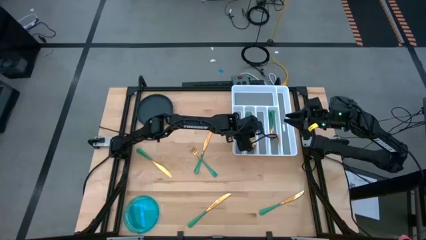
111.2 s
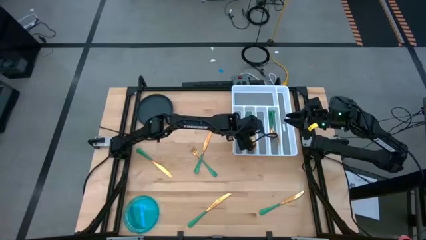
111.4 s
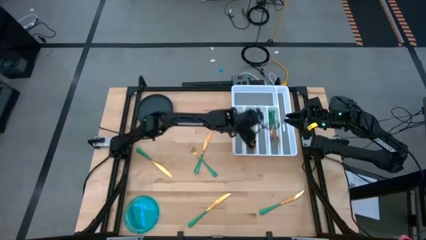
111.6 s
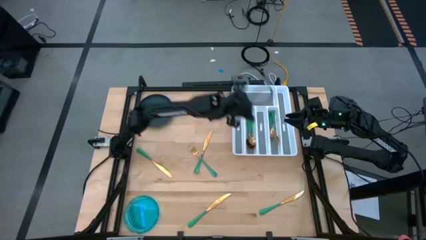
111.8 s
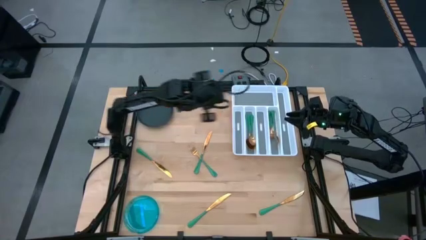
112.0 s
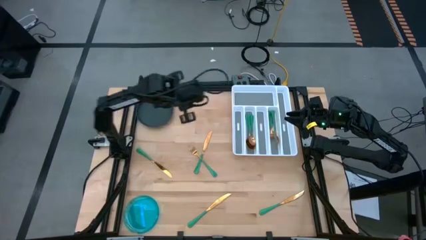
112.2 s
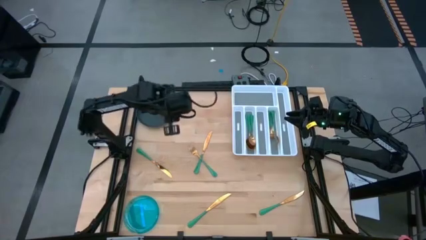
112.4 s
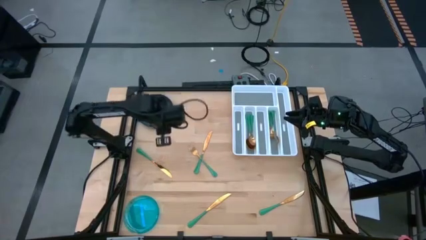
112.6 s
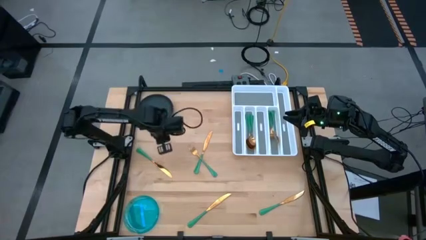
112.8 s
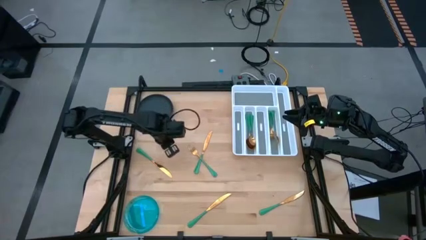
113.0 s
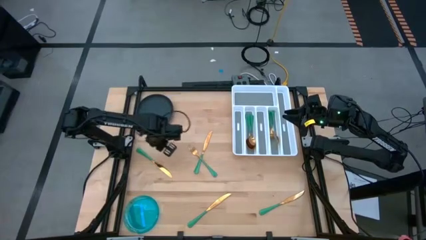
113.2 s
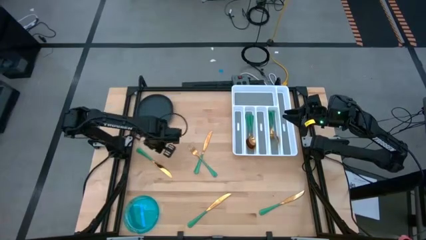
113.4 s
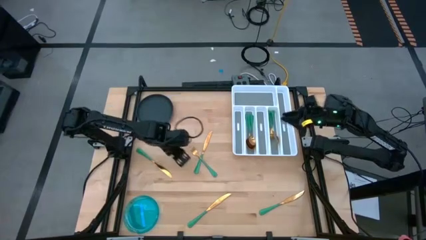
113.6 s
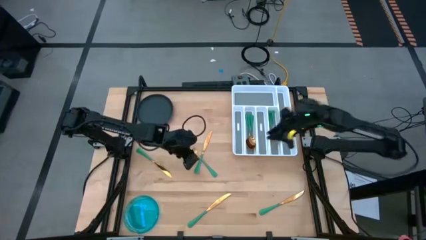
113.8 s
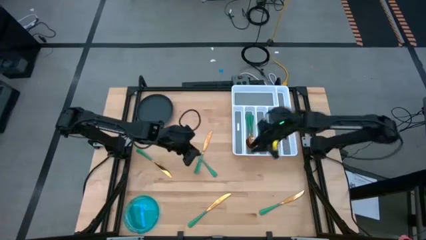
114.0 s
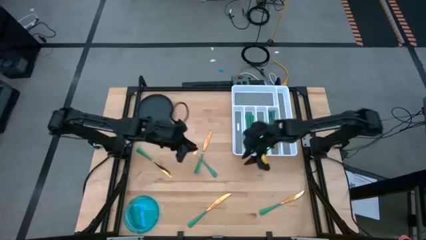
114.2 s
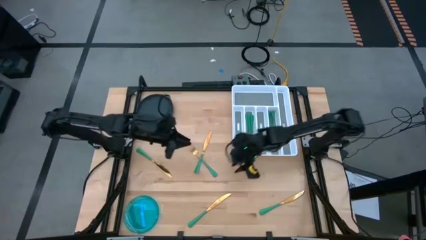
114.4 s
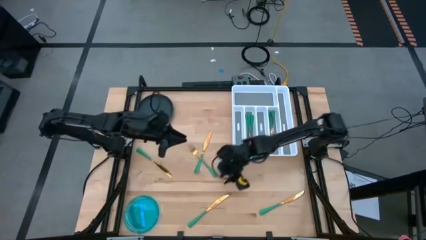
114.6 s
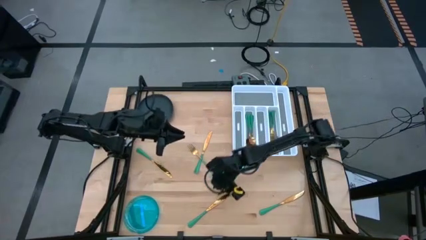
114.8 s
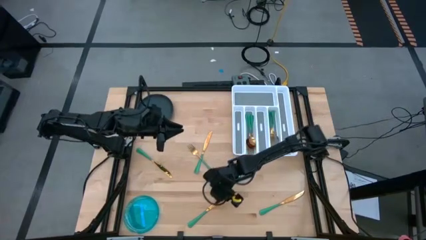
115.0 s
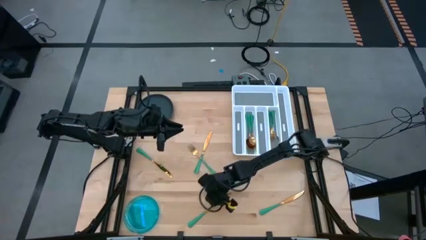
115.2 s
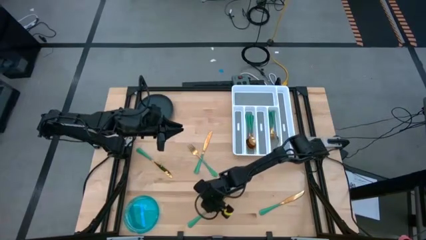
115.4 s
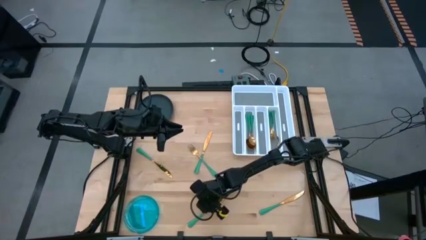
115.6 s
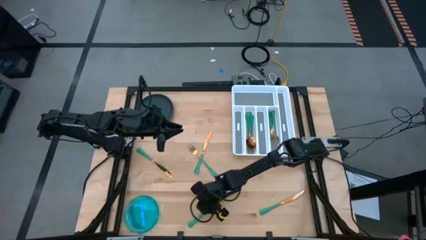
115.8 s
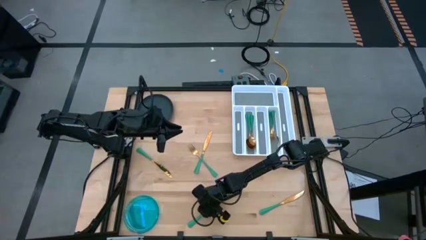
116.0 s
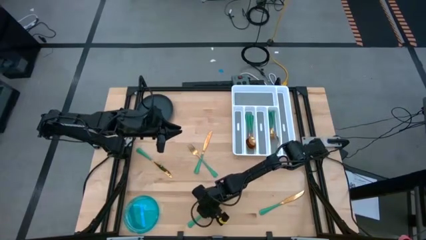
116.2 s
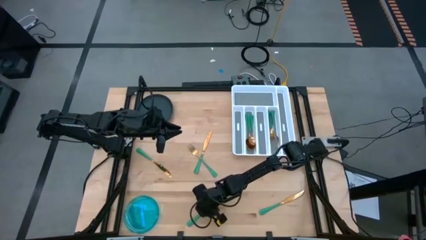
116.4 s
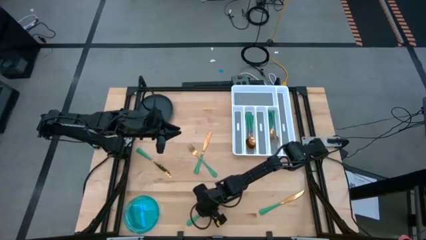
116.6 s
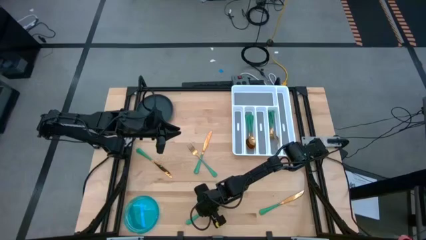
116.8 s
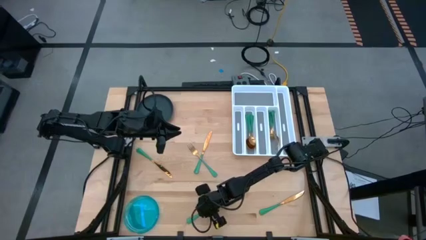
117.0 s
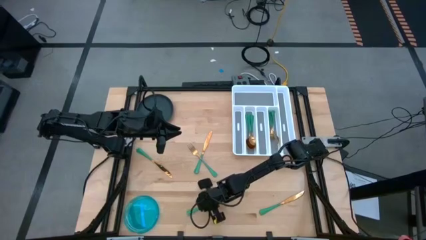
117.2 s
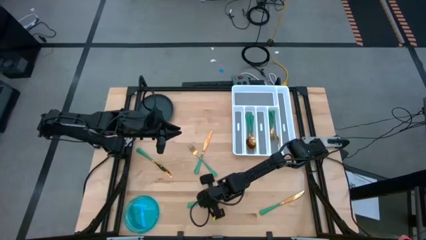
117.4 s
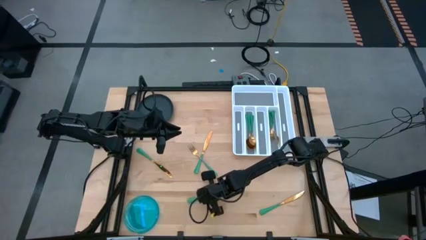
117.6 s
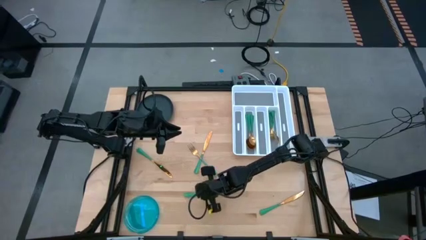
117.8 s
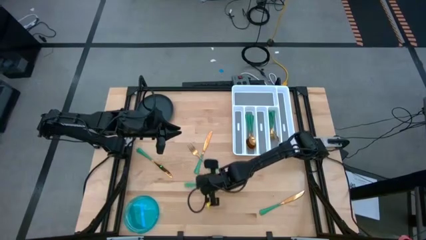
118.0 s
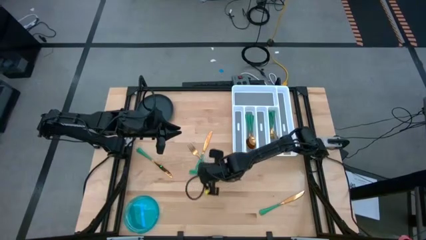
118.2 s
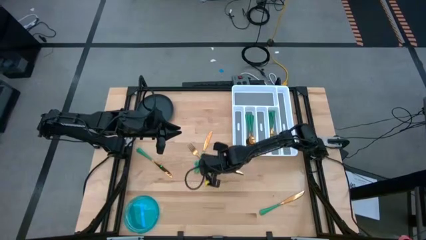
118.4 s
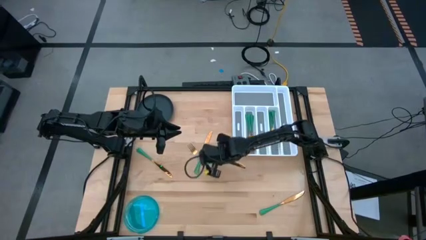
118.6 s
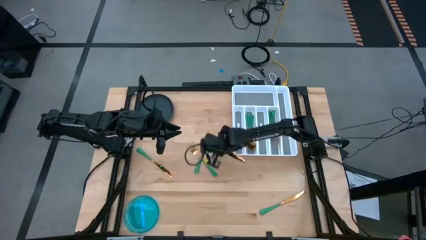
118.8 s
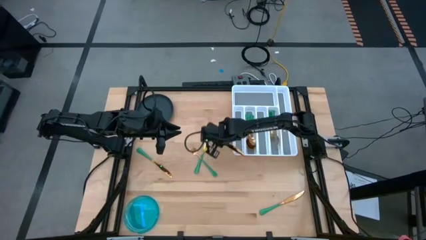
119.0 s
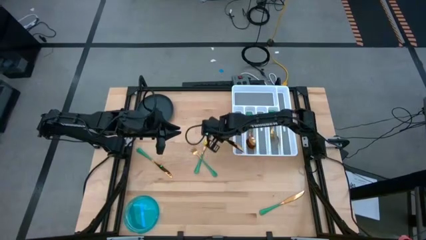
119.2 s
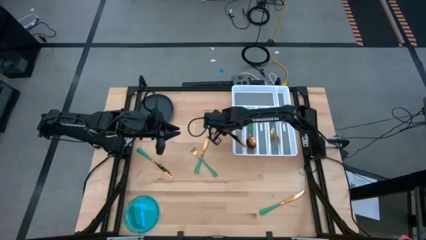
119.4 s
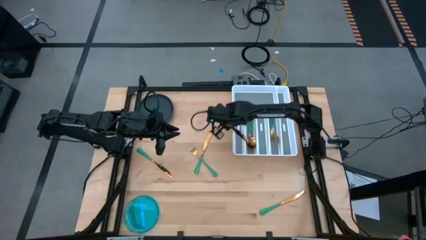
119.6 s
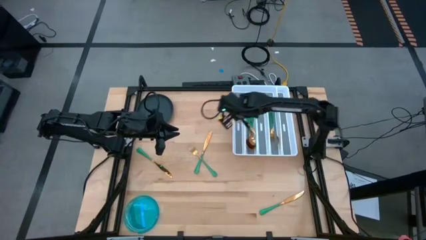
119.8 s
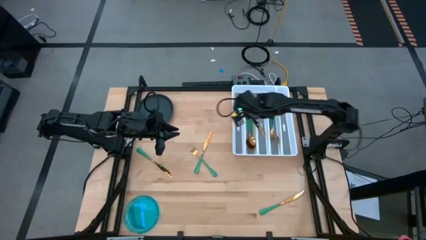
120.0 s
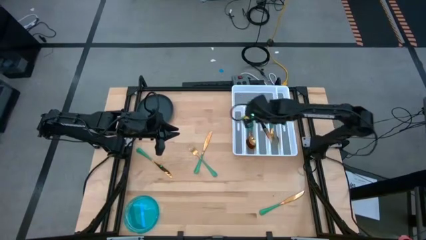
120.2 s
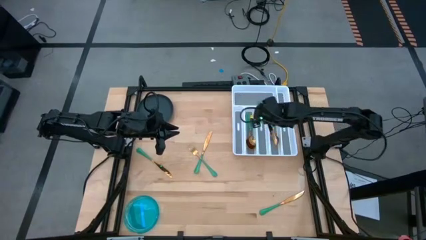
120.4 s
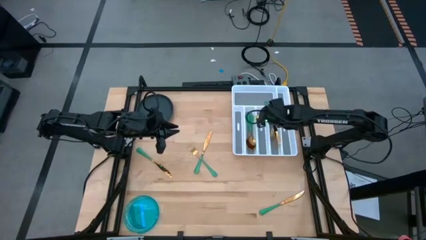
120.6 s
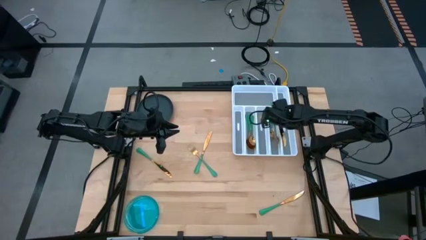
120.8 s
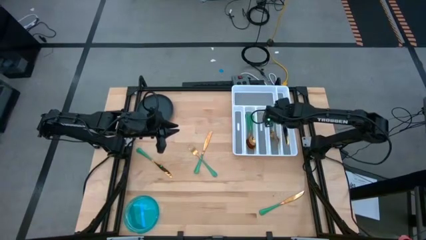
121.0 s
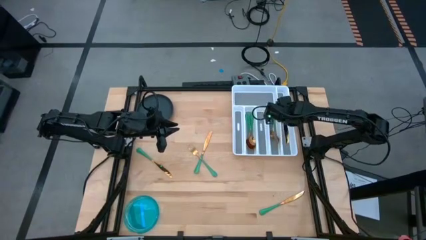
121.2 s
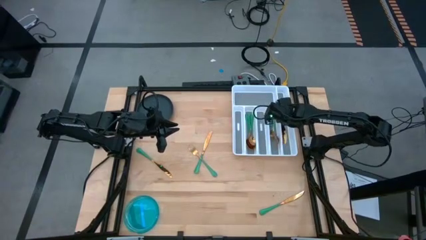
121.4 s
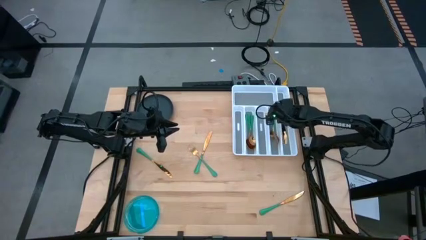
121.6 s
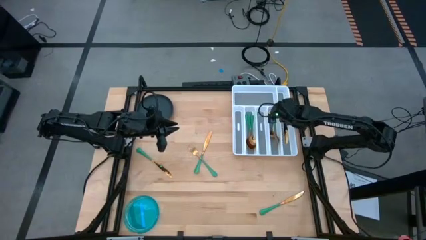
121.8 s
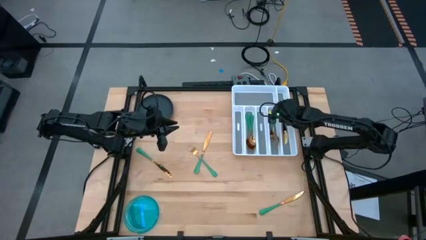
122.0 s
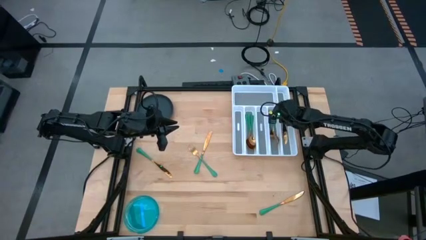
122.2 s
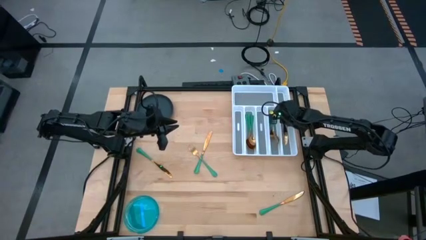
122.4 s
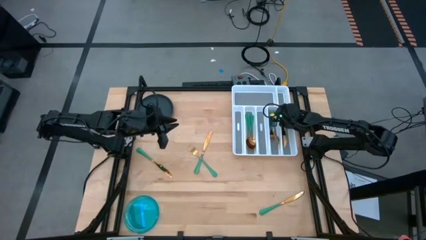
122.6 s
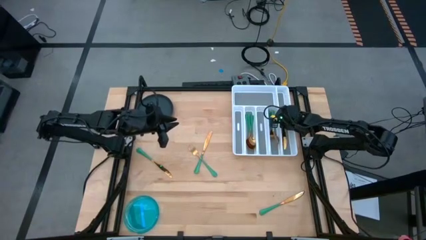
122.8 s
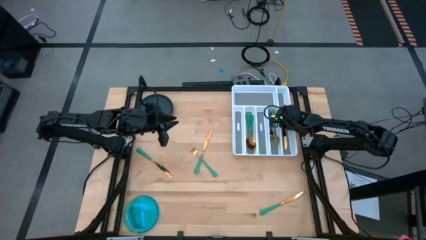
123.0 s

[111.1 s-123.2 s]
Task: Sort silverware
Put the green knife into the silverware tray
